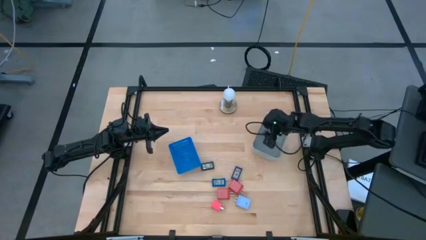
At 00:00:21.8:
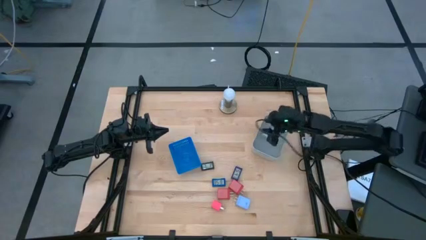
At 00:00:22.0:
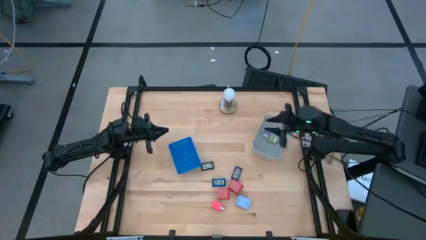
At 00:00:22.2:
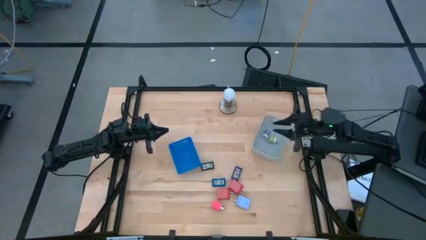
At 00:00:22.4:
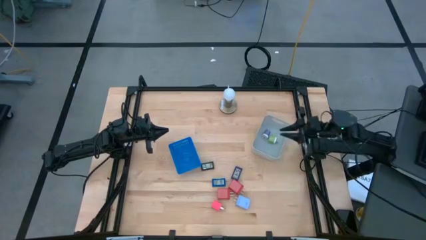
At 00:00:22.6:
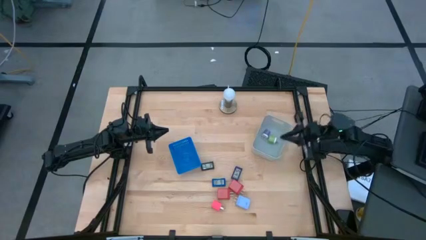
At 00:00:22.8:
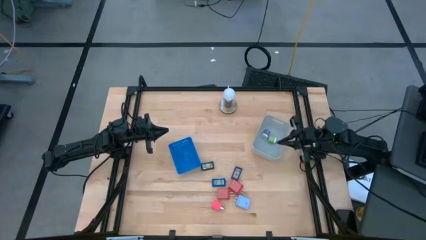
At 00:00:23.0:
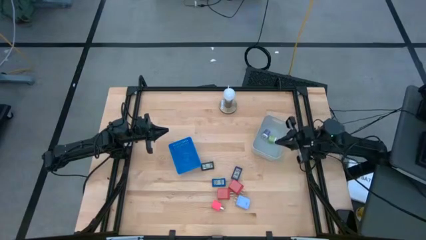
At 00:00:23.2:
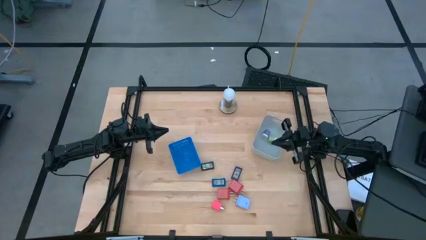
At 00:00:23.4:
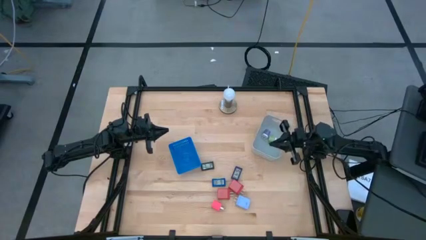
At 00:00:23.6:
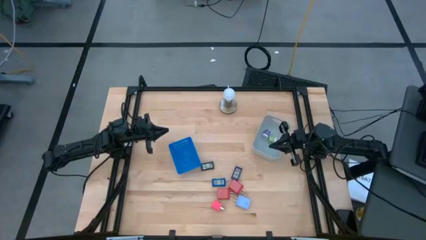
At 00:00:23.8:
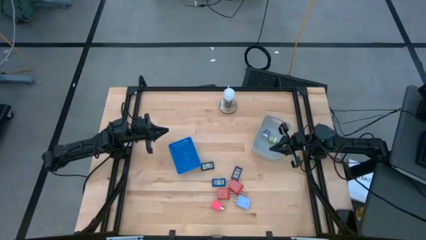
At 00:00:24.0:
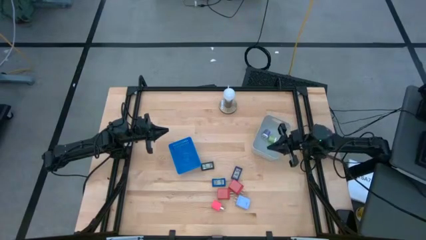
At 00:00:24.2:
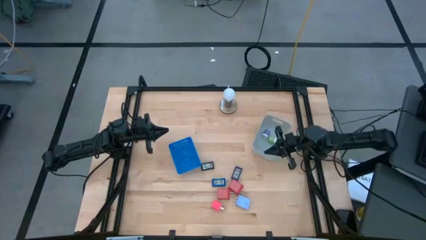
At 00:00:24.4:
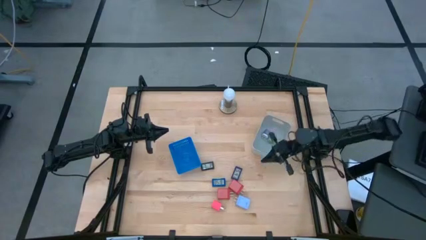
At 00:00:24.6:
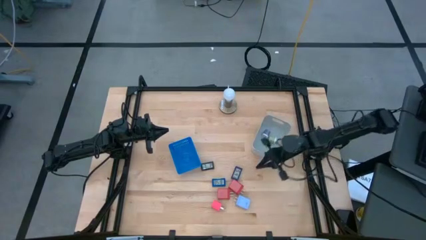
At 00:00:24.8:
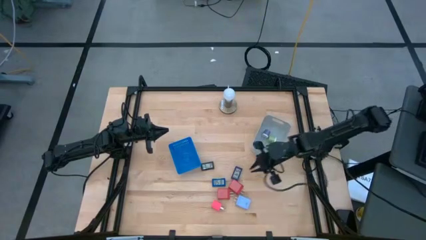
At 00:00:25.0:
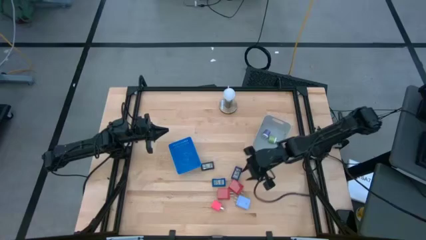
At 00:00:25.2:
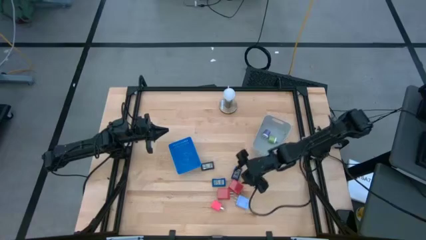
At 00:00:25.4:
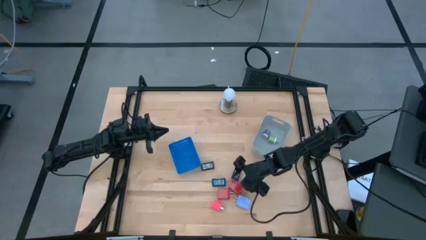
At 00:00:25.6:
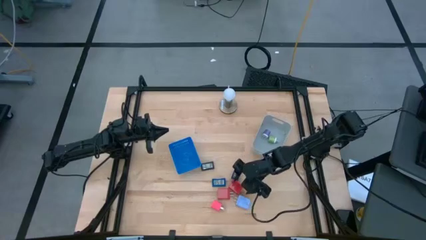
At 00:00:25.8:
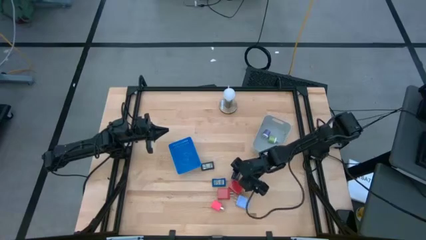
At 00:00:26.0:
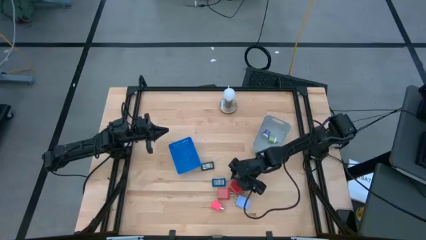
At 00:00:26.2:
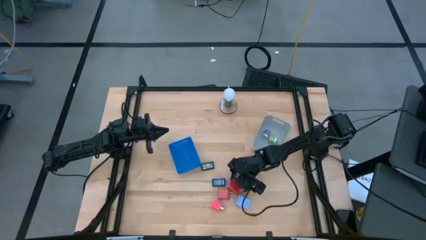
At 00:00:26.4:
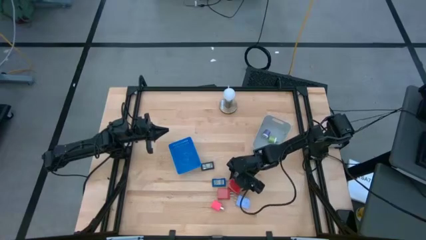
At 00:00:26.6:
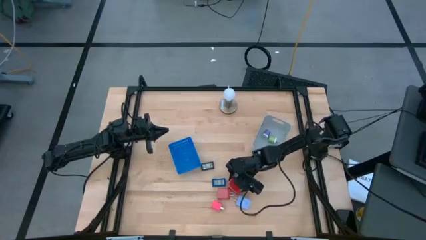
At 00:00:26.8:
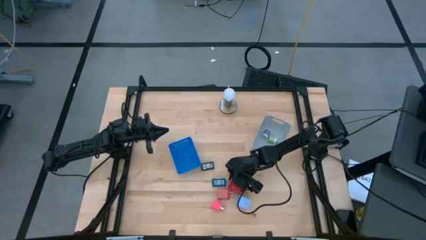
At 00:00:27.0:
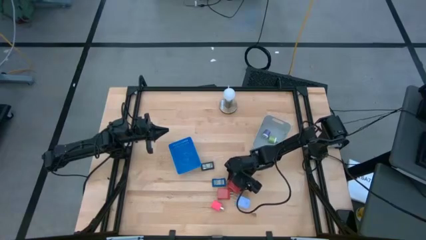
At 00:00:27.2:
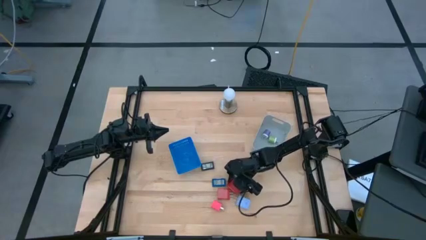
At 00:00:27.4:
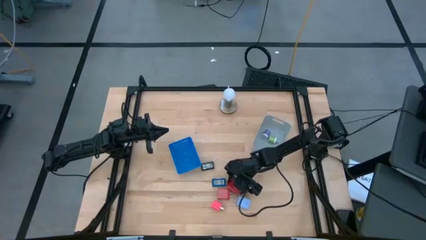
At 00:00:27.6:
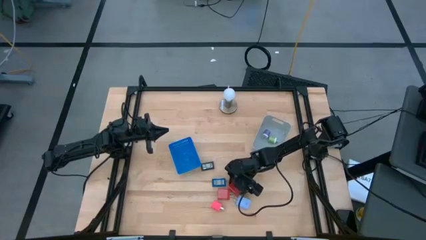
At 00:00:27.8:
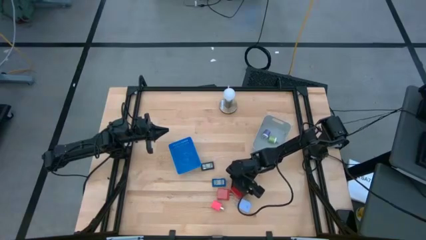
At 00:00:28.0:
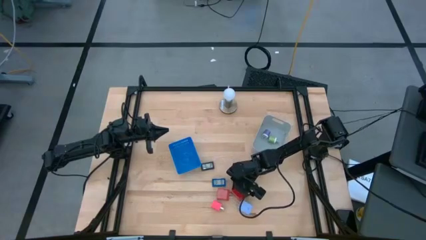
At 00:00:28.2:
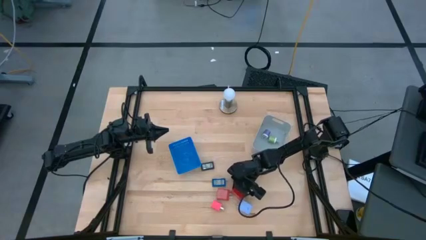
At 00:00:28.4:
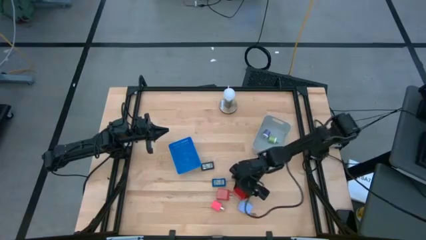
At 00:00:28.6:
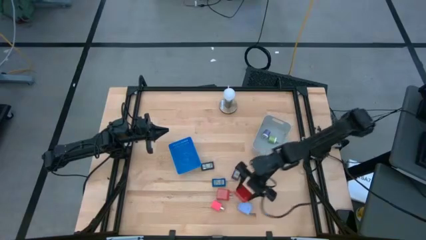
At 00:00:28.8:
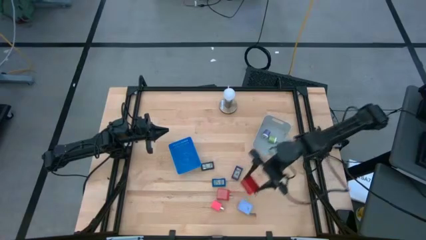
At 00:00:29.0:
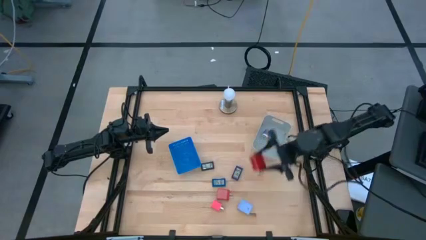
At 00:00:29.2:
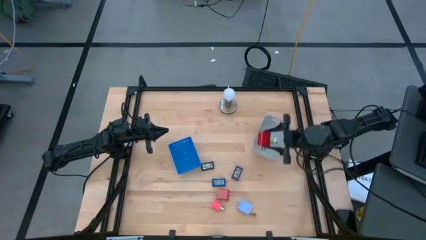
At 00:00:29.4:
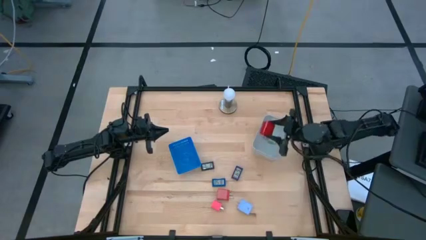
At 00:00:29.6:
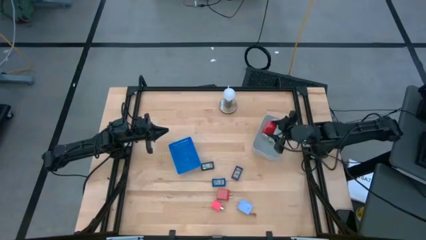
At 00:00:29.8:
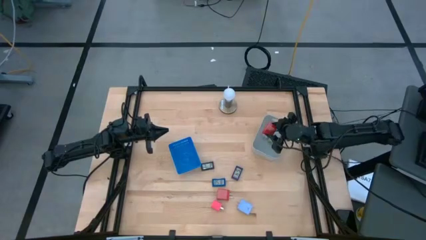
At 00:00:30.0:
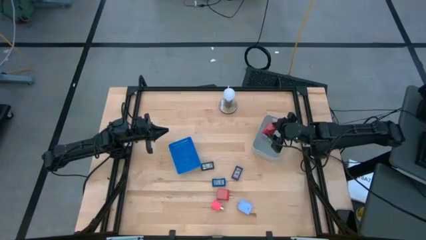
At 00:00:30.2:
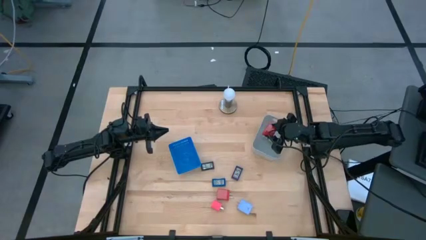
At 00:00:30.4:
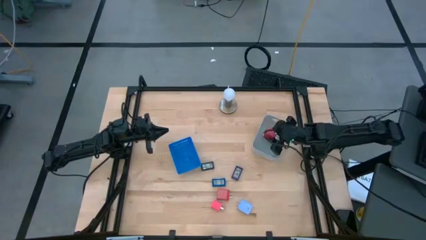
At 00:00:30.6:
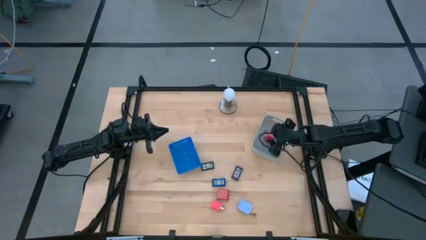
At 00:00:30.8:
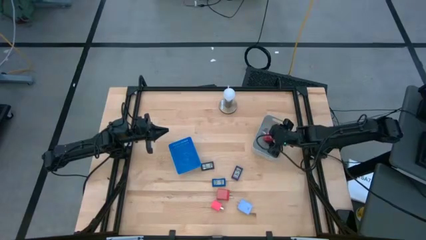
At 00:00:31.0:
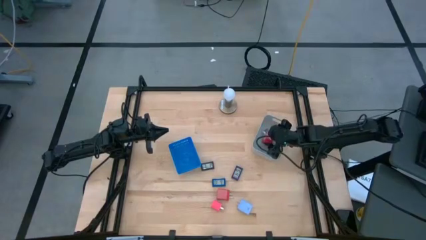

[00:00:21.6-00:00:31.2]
Task: Pick & Place Office items
Put the right red changer adapter into the gray bin

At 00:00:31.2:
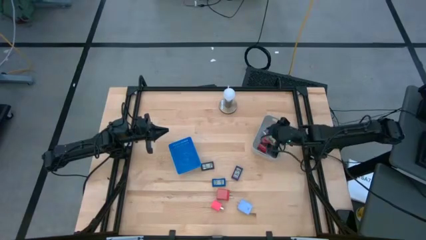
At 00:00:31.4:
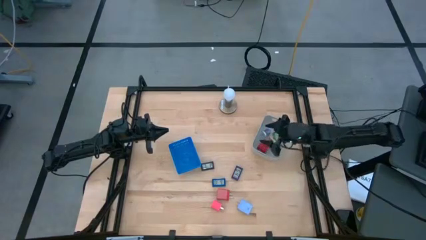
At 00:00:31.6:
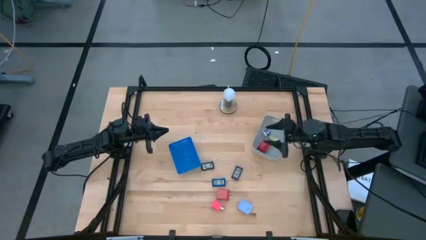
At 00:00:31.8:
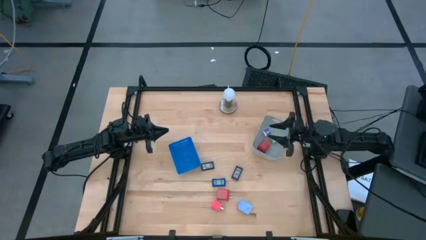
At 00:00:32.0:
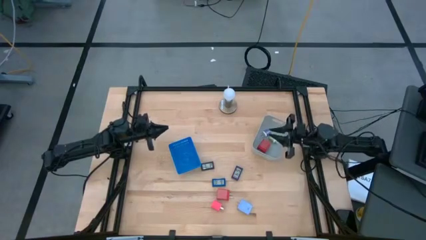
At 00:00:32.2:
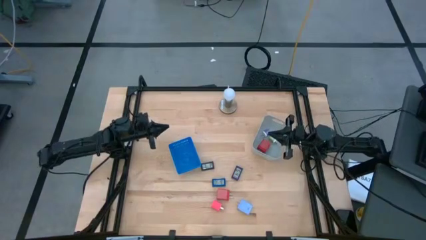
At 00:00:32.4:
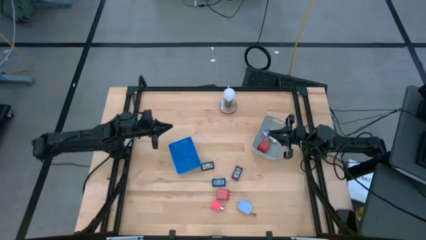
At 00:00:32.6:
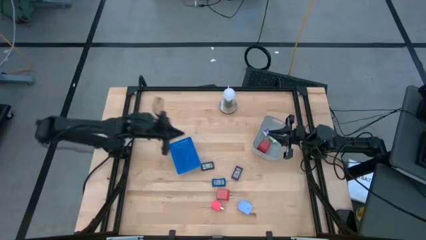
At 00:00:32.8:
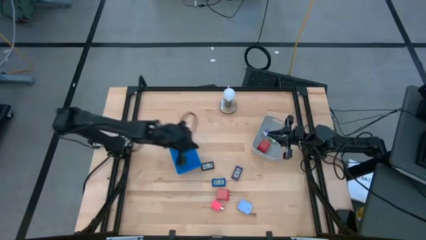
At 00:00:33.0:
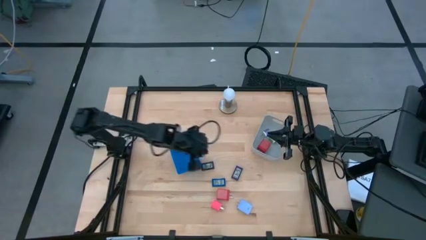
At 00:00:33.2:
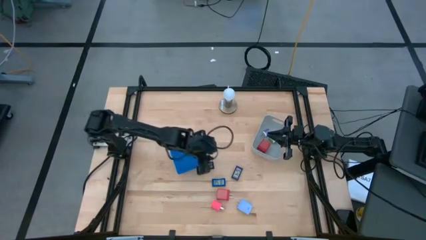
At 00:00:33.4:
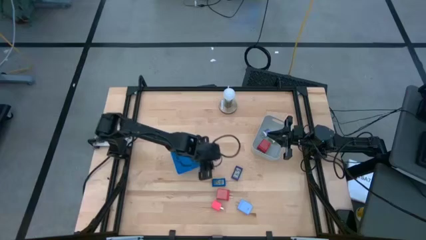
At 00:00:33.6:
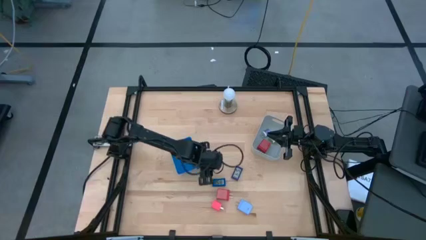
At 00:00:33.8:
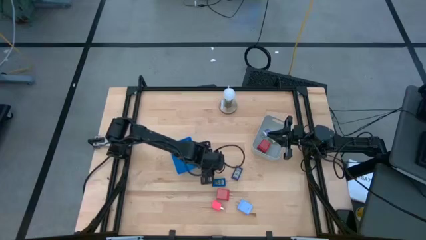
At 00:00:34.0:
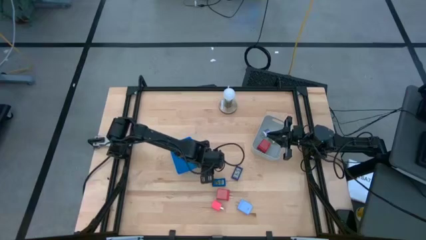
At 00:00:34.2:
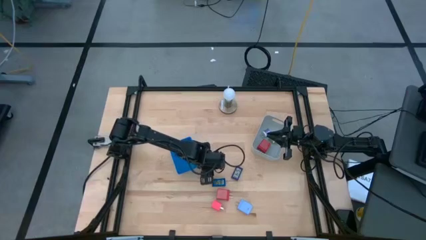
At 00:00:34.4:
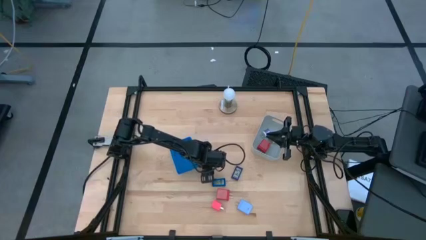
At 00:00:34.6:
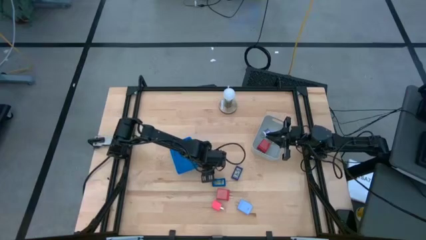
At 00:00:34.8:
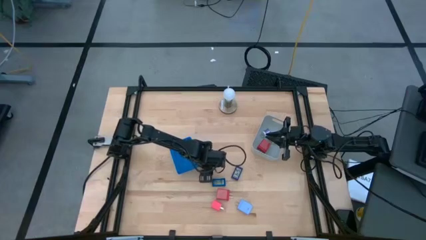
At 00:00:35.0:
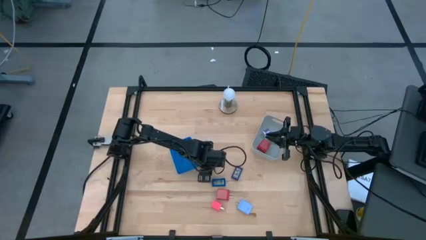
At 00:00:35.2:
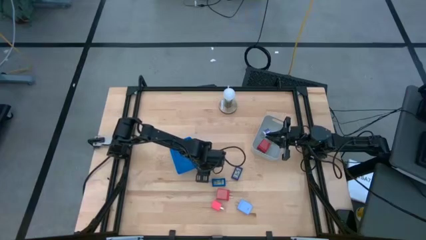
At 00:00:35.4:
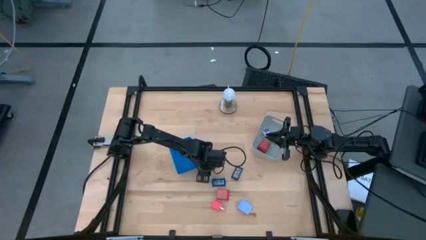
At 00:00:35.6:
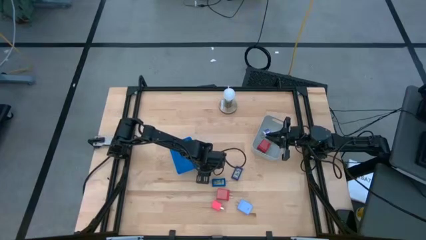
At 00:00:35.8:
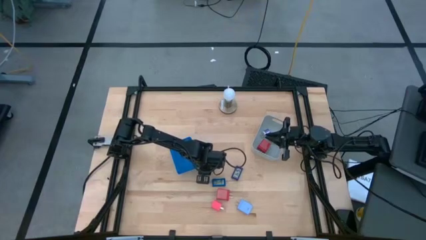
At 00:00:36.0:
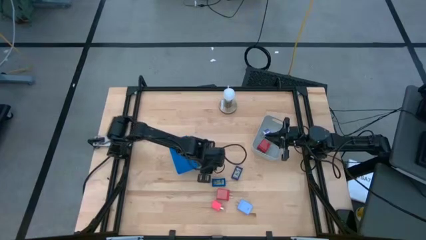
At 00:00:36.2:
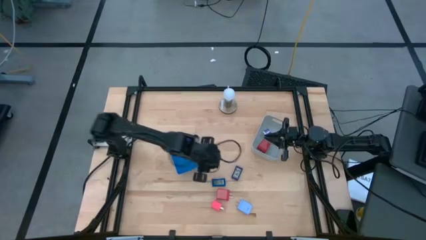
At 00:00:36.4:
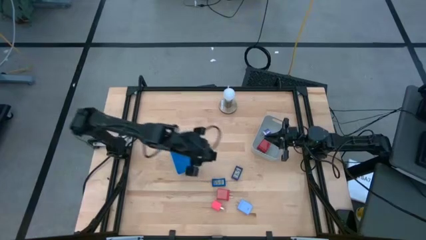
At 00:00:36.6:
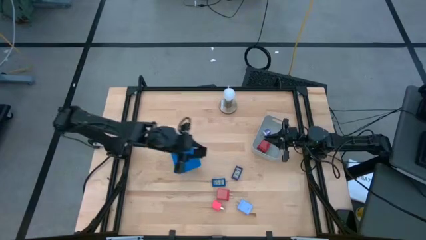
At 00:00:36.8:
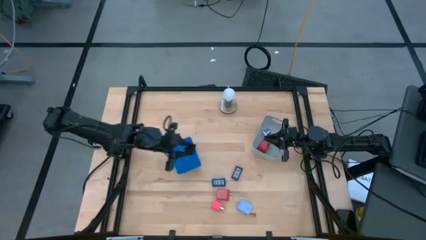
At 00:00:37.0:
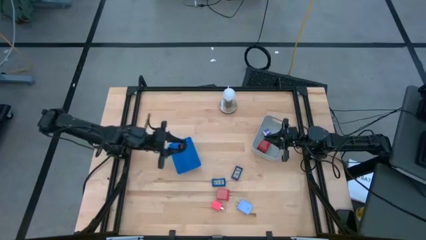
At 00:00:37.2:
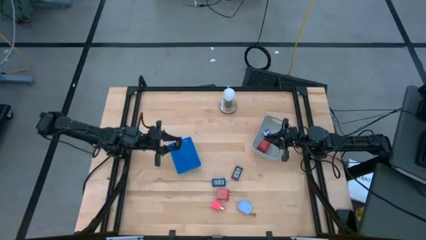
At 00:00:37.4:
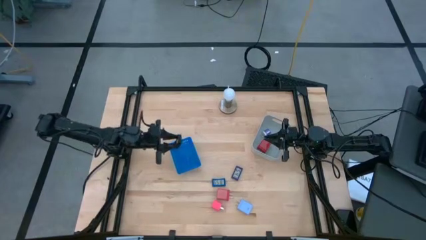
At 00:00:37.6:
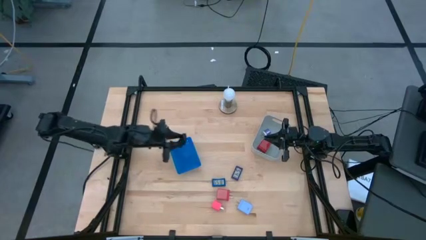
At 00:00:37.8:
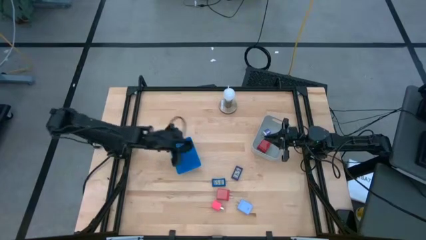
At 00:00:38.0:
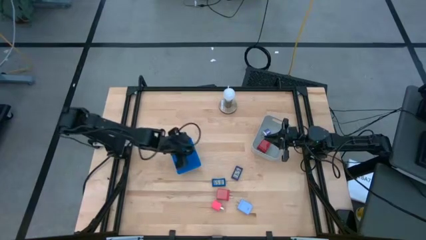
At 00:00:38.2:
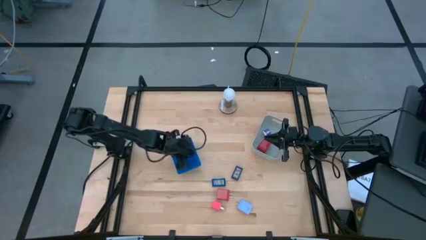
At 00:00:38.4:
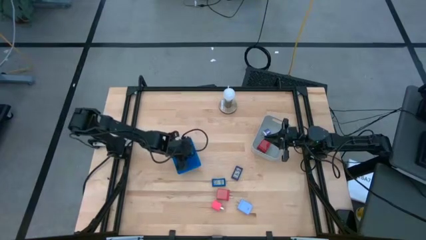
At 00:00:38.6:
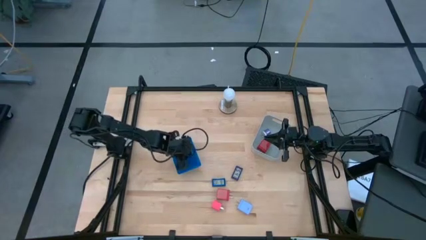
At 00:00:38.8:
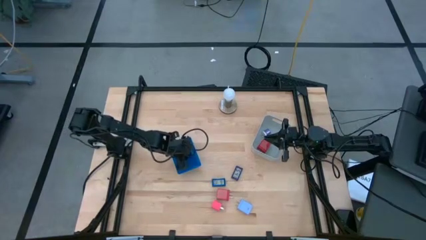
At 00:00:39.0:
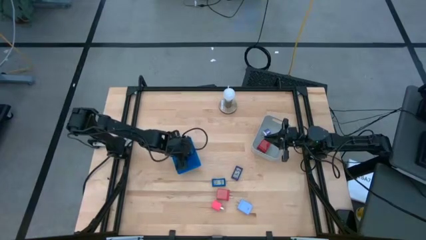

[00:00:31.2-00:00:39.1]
Put the black digital timer into the blue bin
